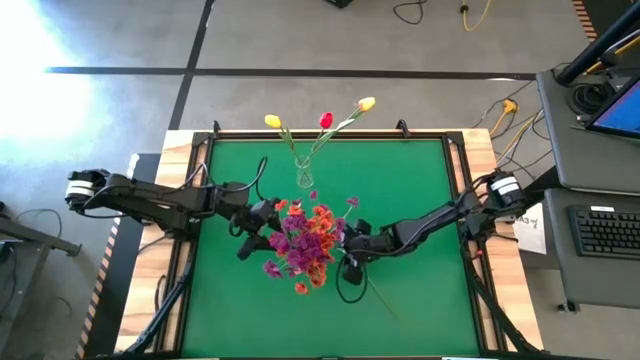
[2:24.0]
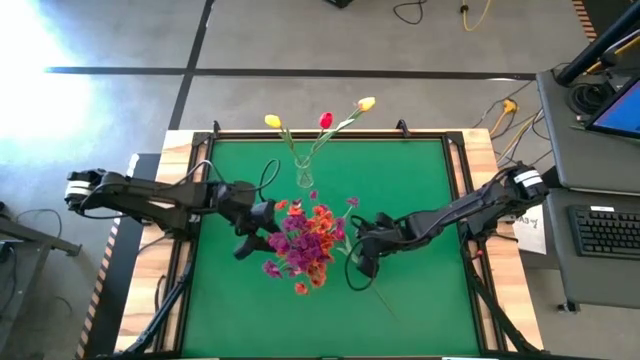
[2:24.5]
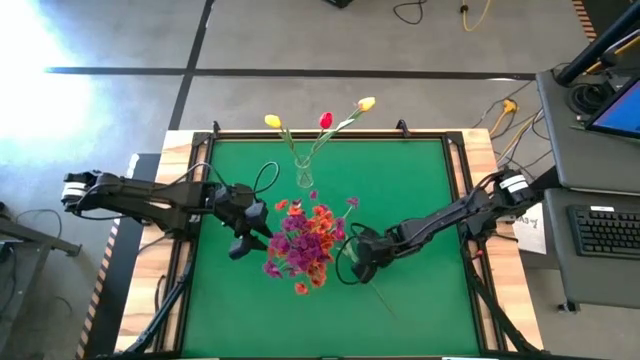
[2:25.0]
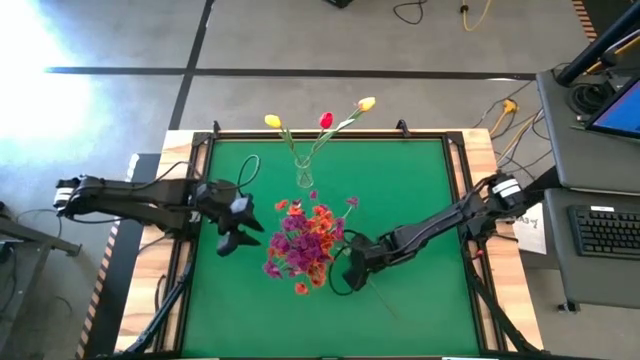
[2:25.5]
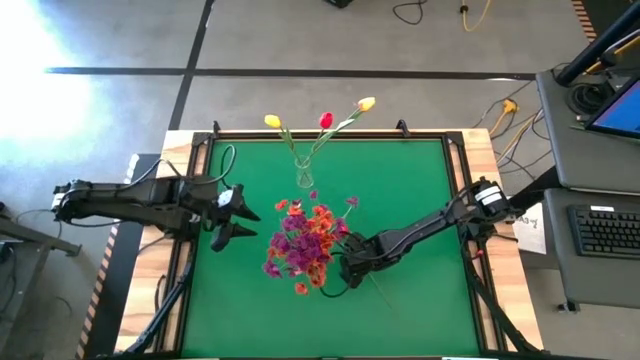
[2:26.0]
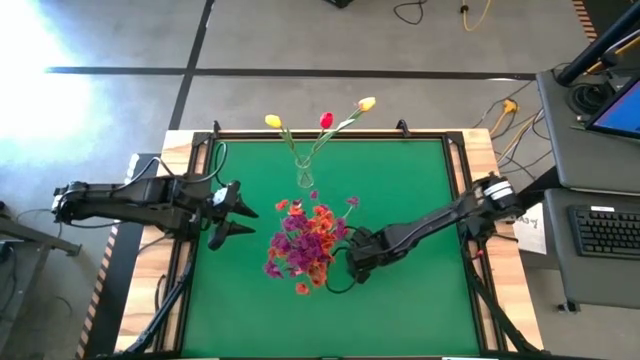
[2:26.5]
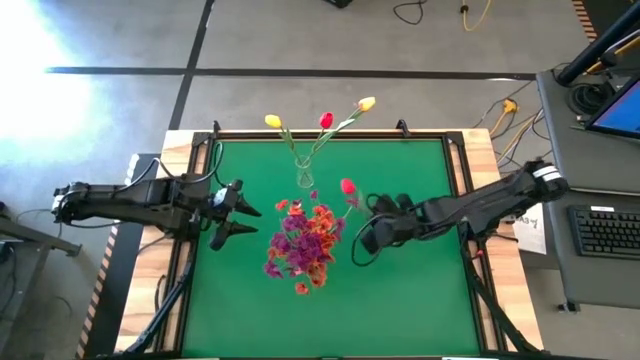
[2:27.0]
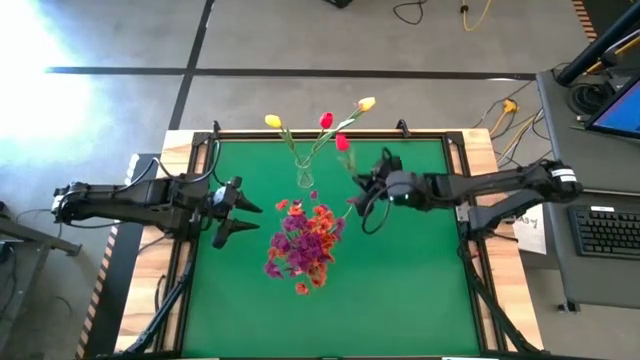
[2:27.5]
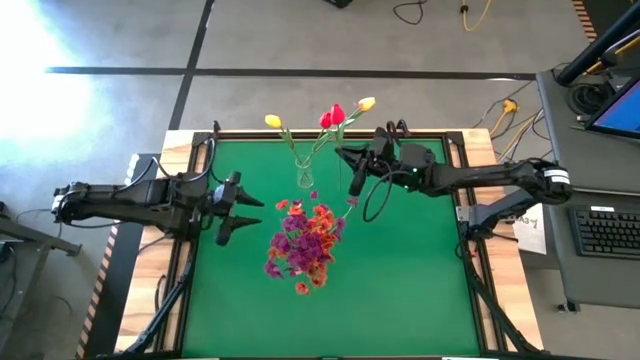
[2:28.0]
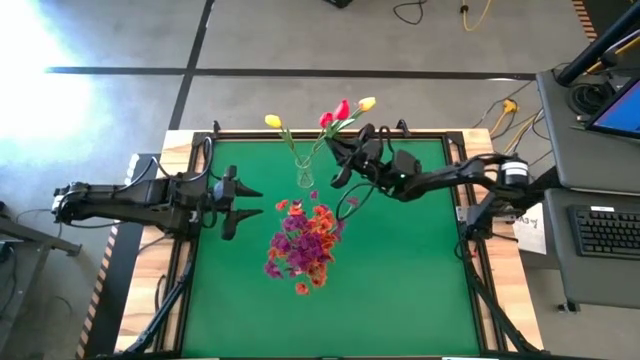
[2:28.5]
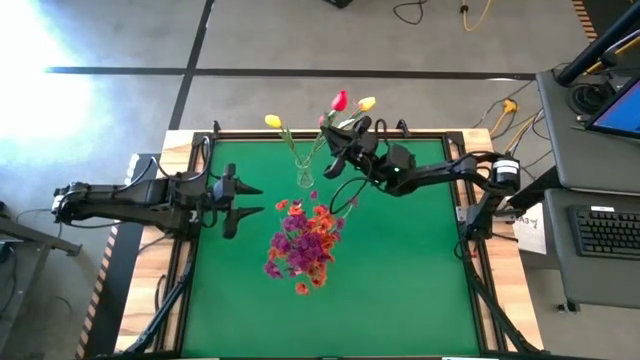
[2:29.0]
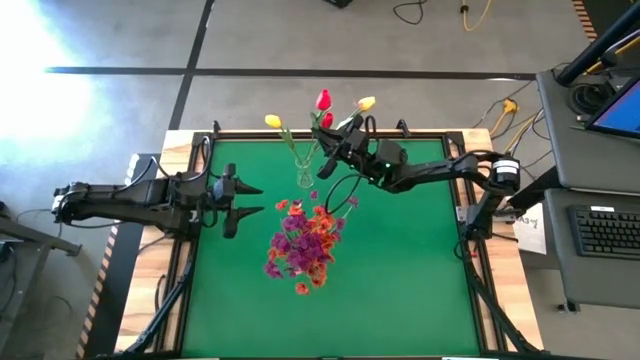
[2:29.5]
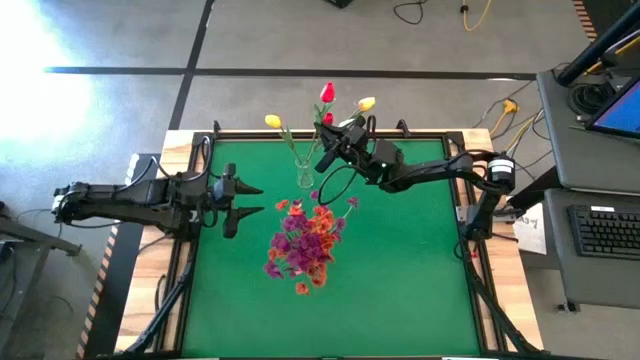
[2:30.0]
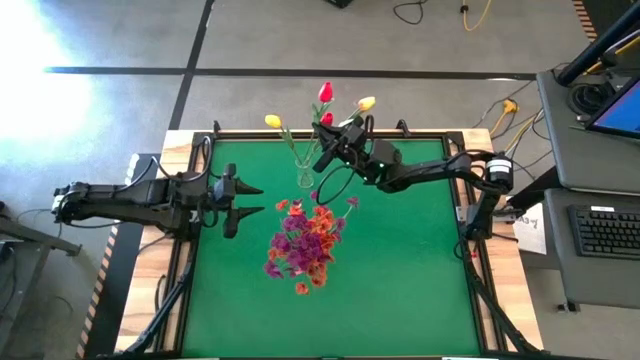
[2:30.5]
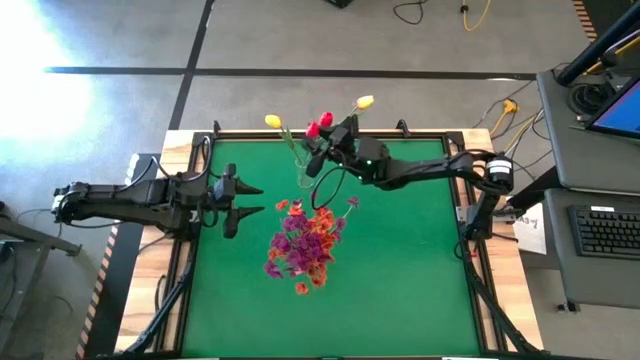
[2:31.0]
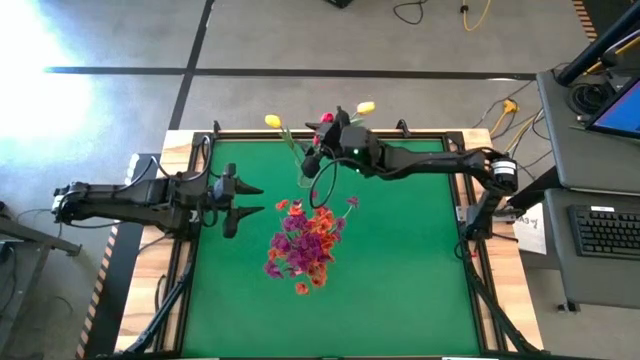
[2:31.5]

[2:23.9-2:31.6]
Task: Sort flowers into vase by color
Put the red tulip into the transparent vase

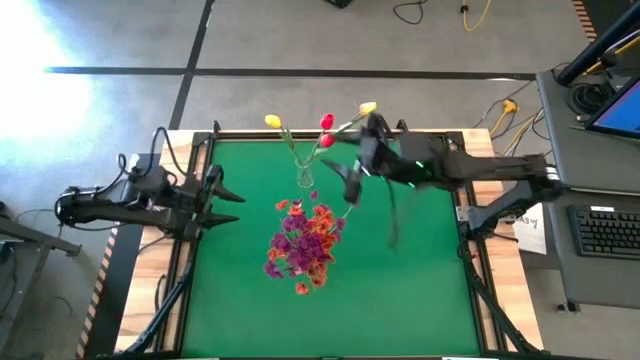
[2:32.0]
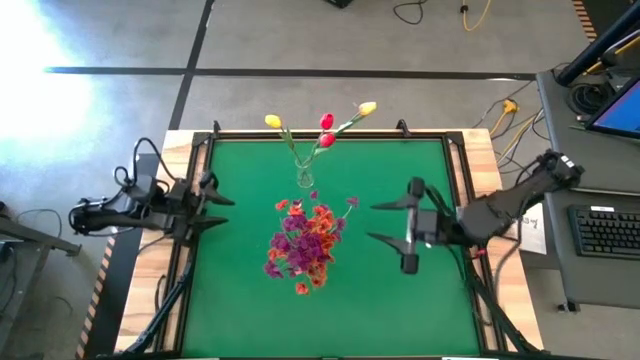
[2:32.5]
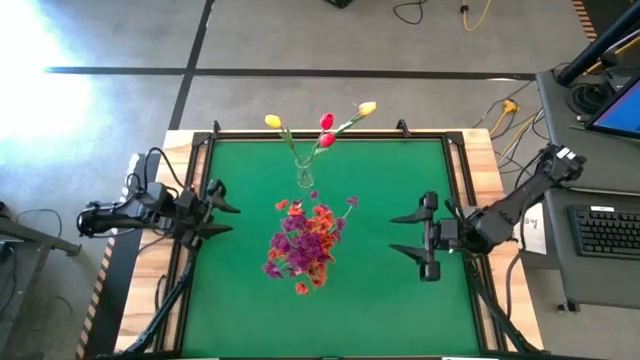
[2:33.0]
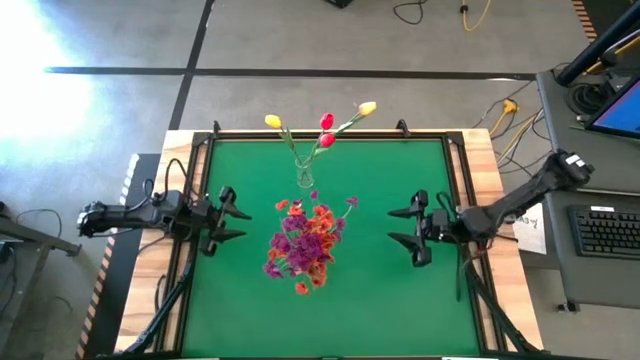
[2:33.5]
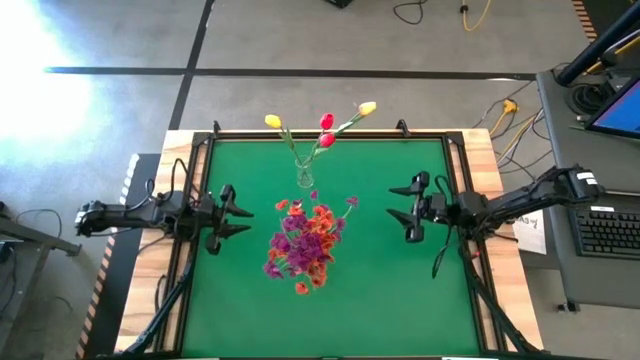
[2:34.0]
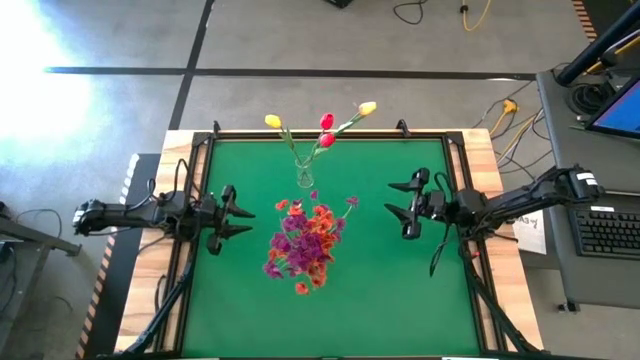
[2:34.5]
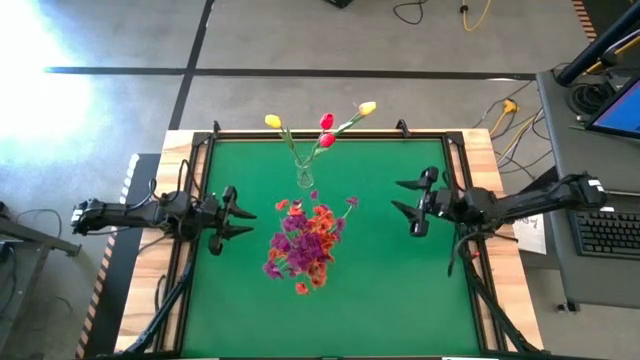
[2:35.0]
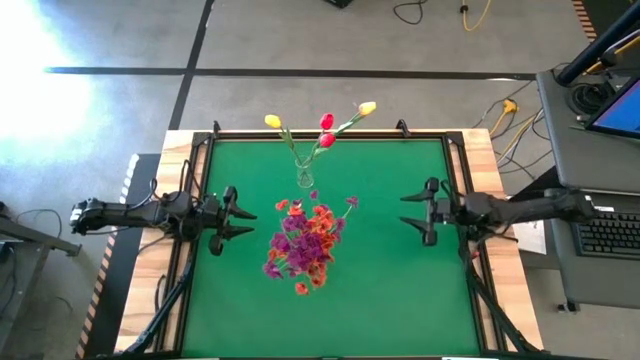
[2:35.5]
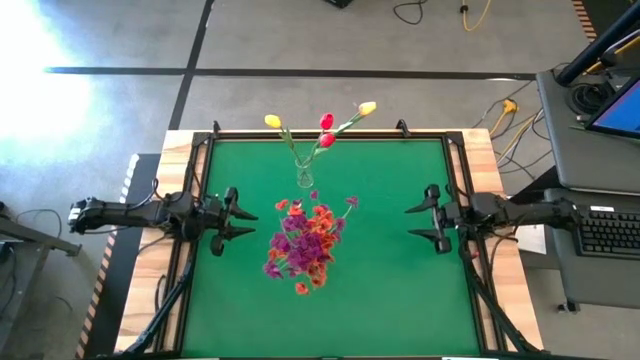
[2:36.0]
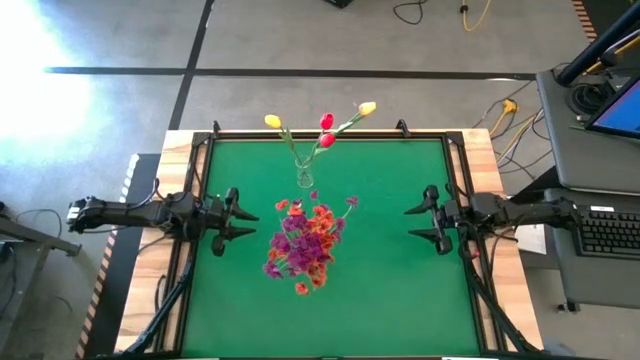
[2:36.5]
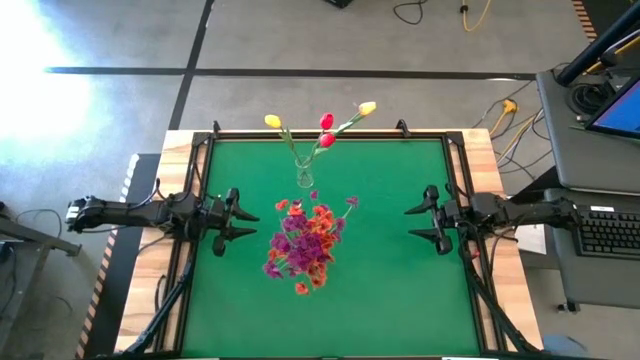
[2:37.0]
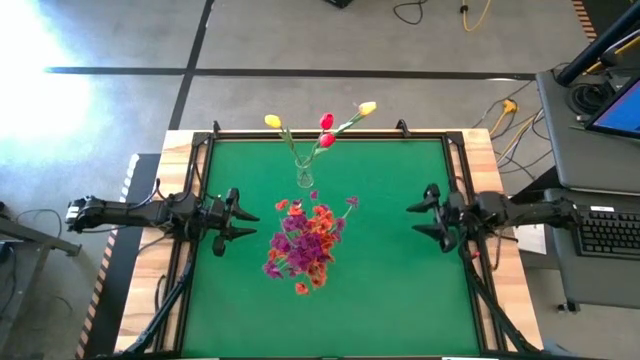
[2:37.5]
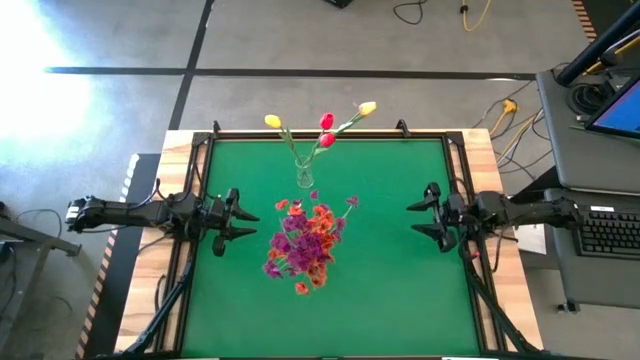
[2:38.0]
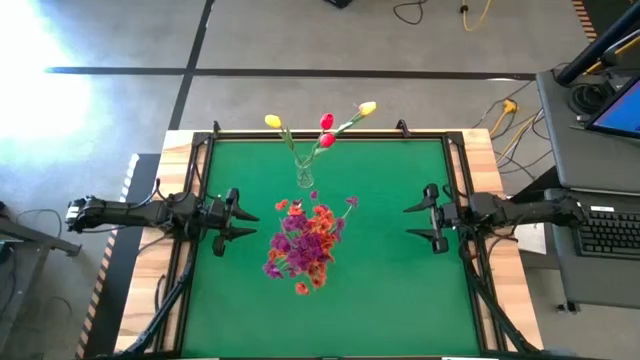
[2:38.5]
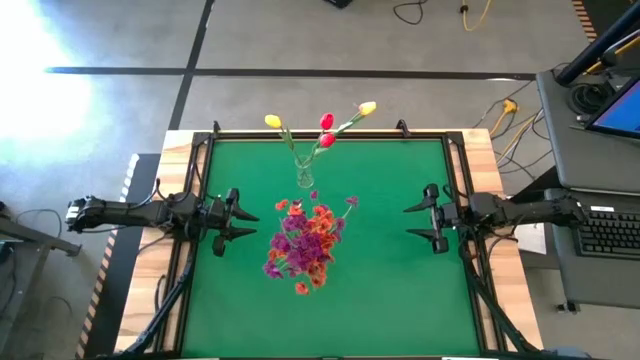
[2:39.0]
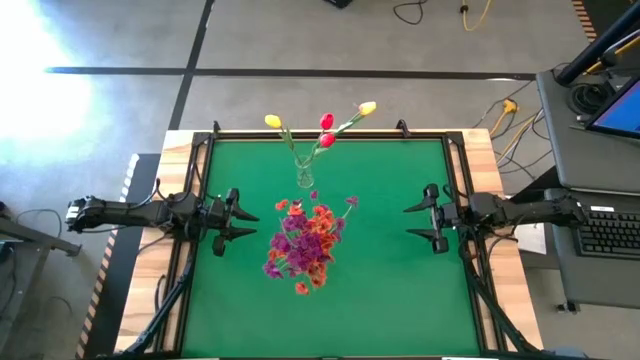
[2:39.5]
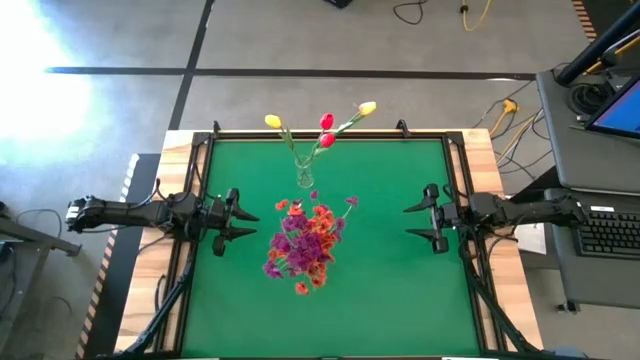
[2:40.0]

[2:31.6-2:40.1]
Return to Home Position

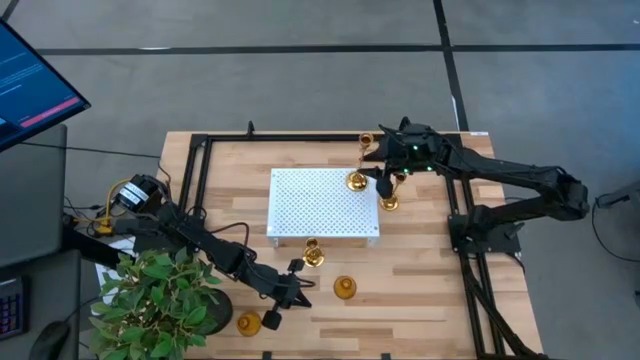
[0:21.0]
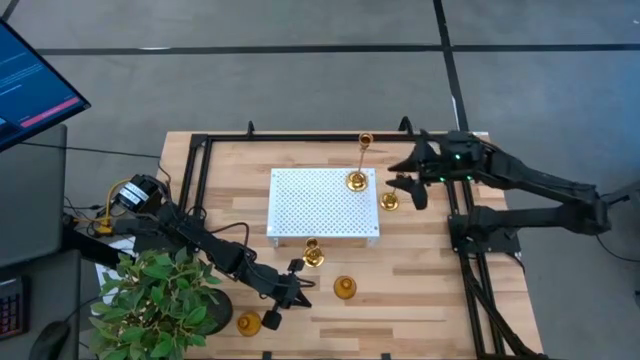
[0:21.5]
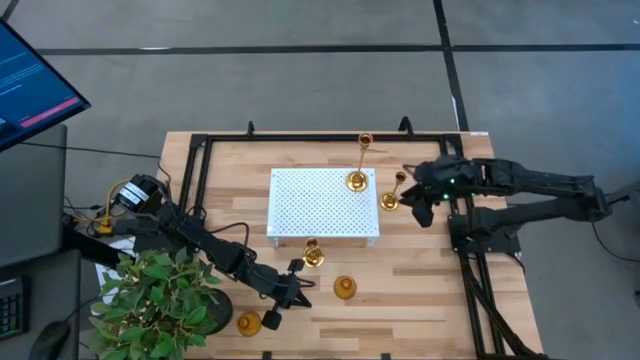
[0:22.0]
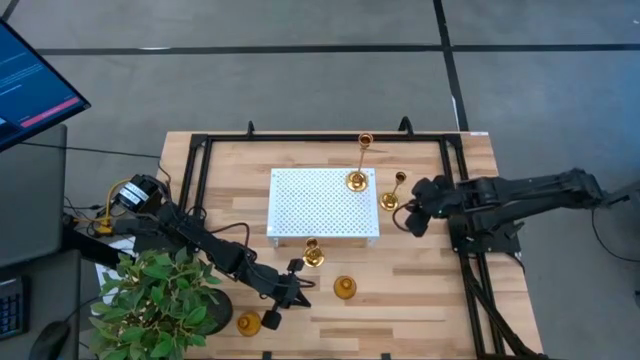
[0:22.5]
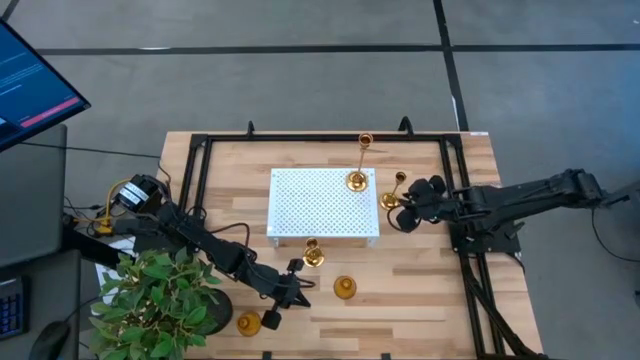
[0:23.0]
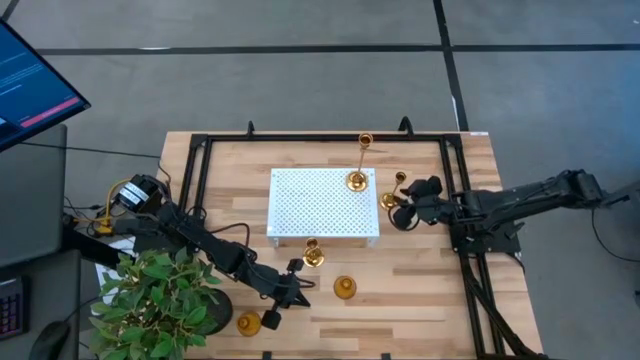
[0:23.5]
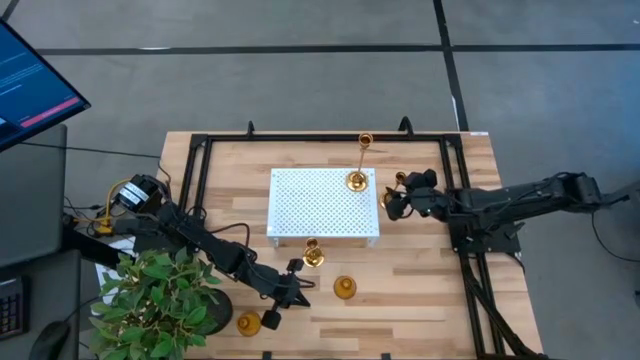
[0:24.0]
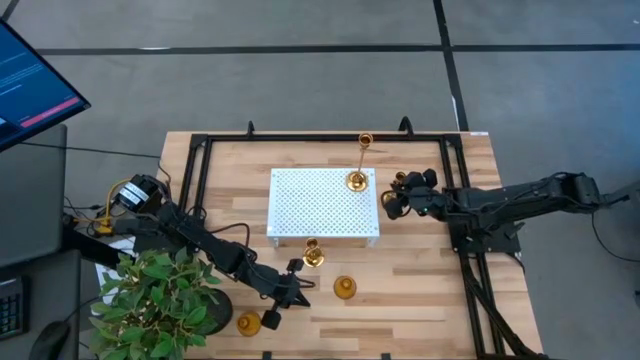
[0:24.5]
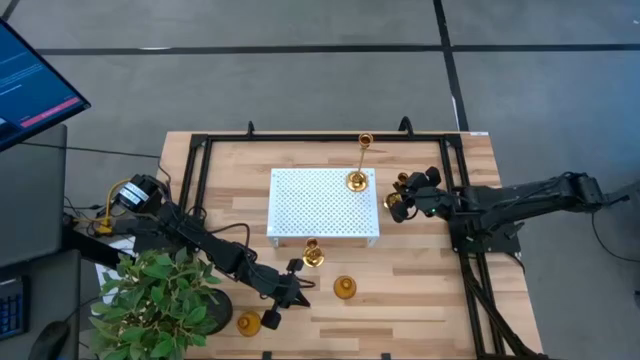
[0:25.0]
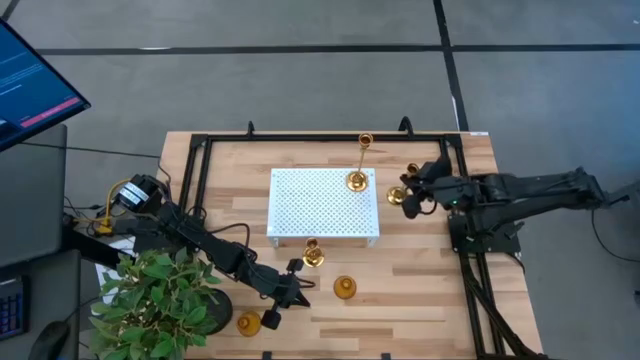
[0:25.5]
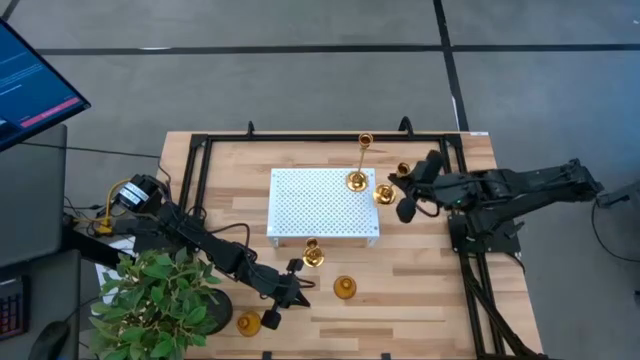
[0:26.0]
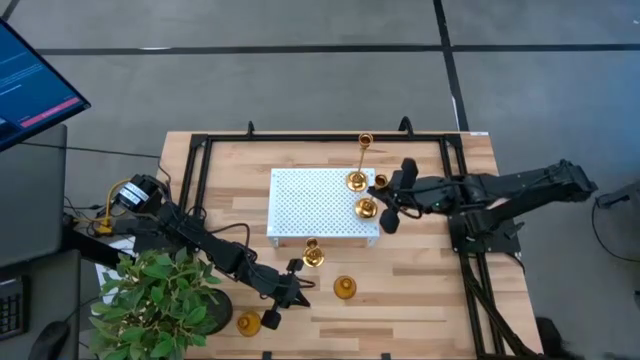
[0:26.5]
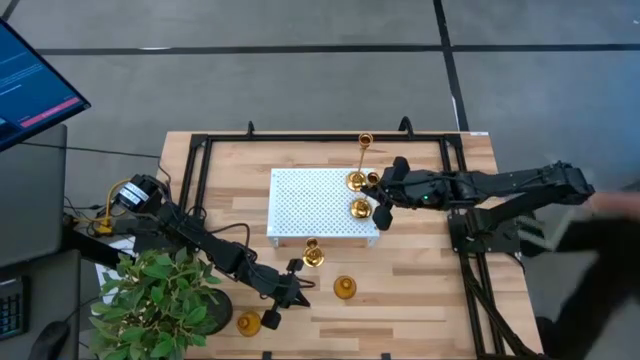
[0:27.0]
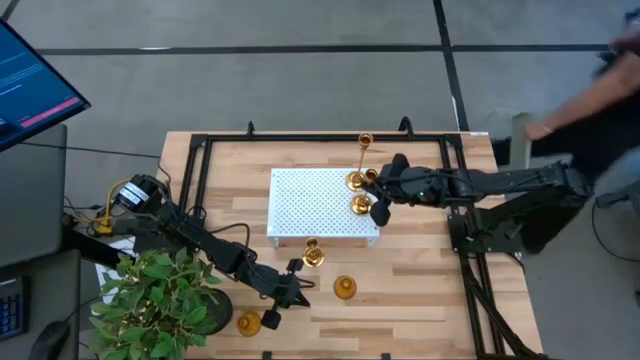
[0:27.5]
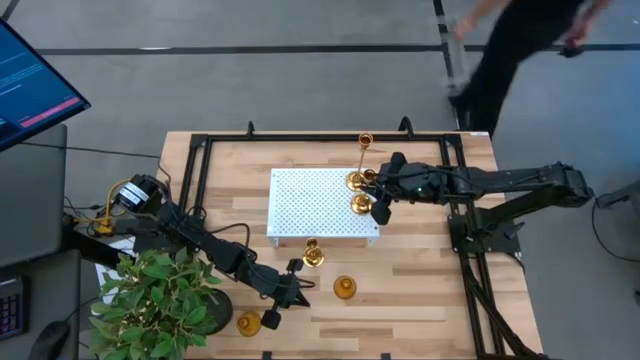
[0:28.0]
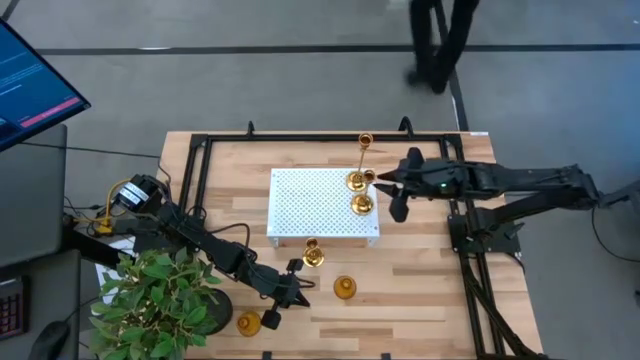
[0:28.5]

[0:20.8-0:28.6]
Task: Pick & Place candle stick holders
Put the top golden candle holder on the shelf aligned with the other golden candle holder
